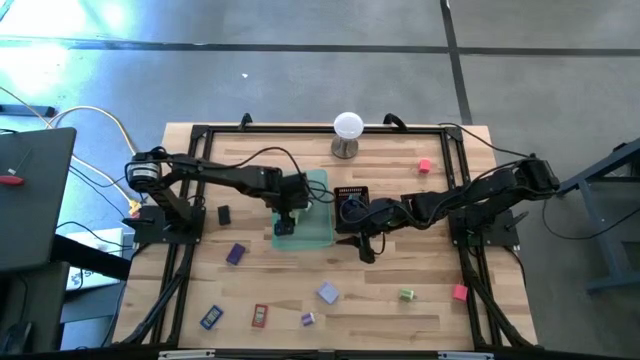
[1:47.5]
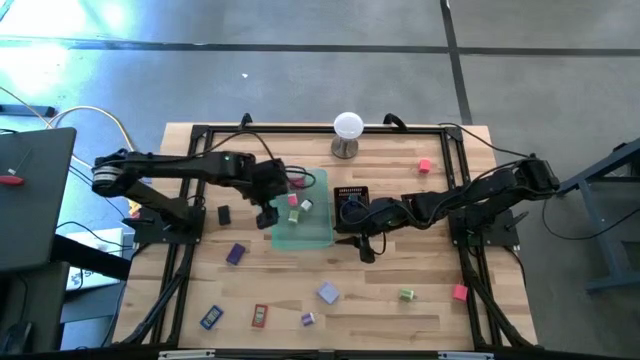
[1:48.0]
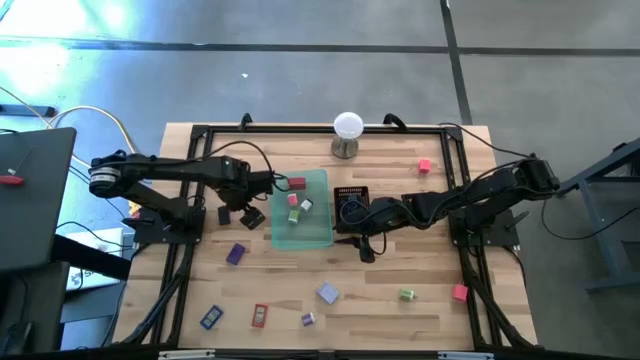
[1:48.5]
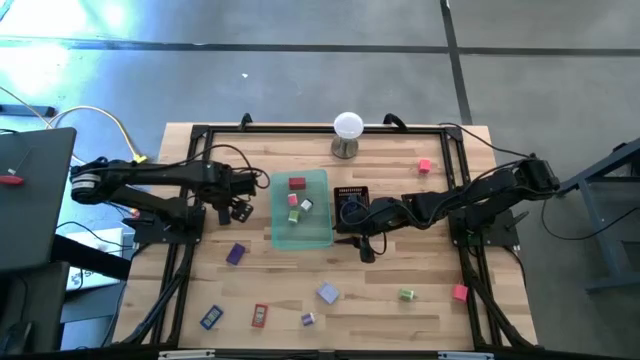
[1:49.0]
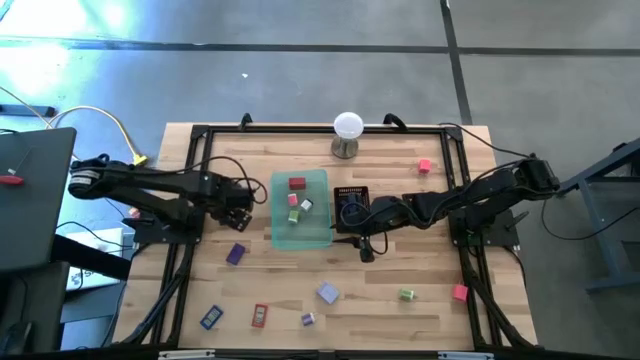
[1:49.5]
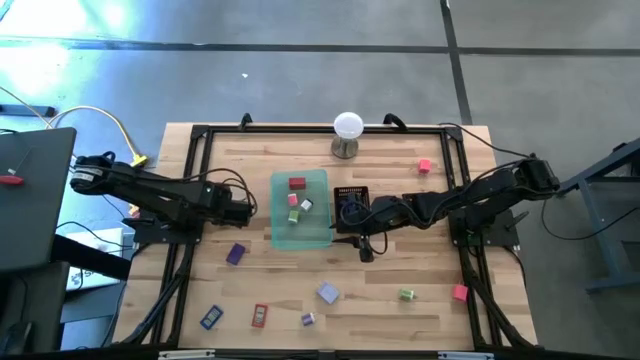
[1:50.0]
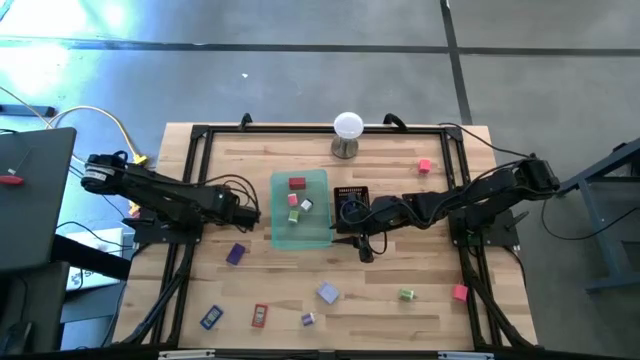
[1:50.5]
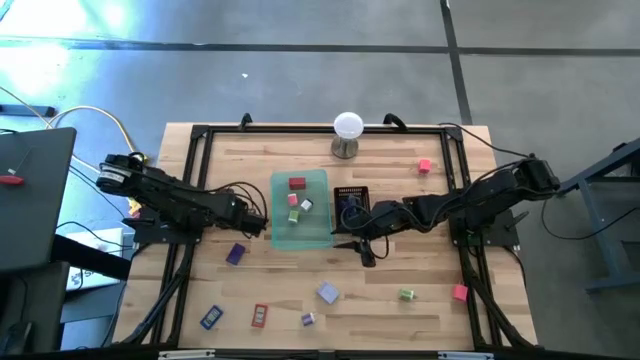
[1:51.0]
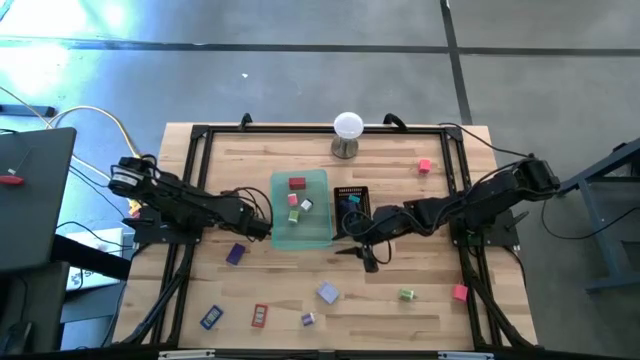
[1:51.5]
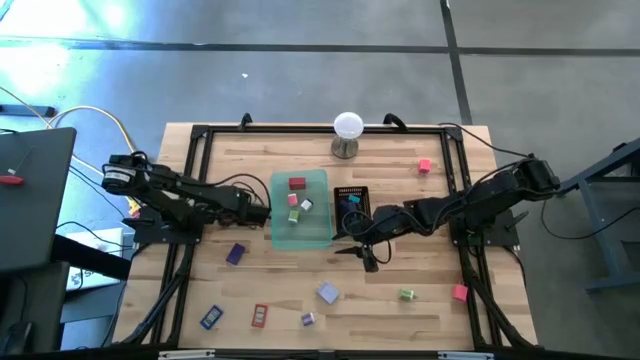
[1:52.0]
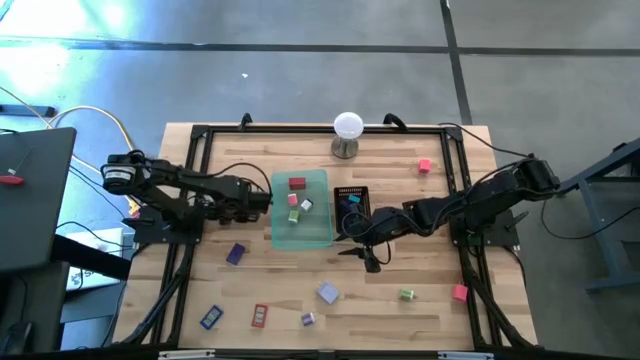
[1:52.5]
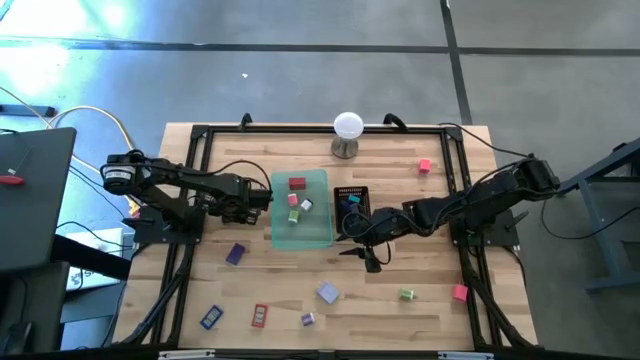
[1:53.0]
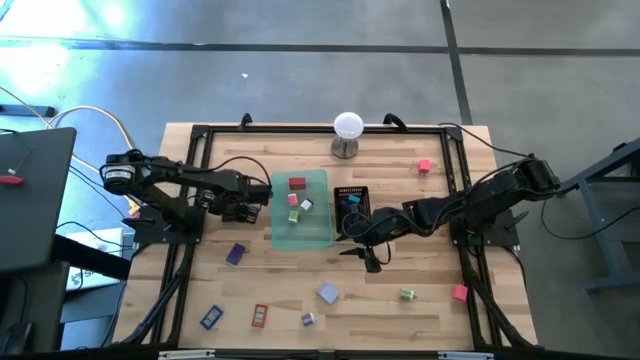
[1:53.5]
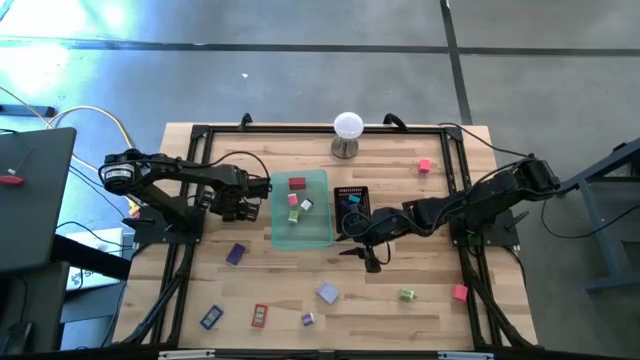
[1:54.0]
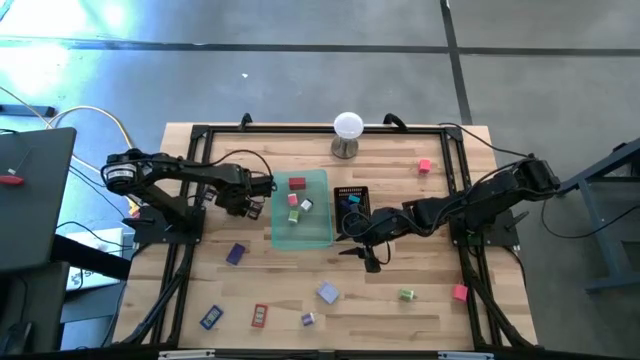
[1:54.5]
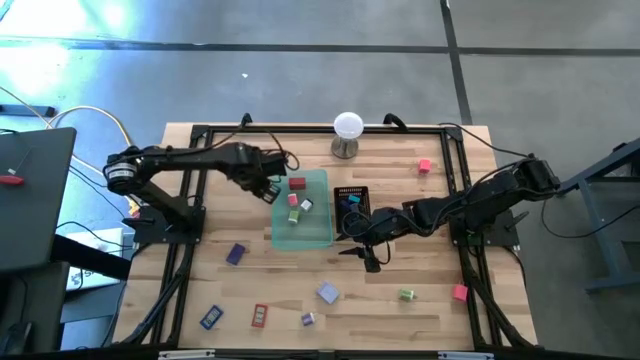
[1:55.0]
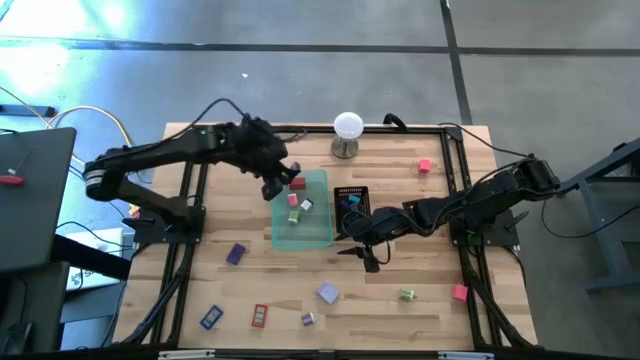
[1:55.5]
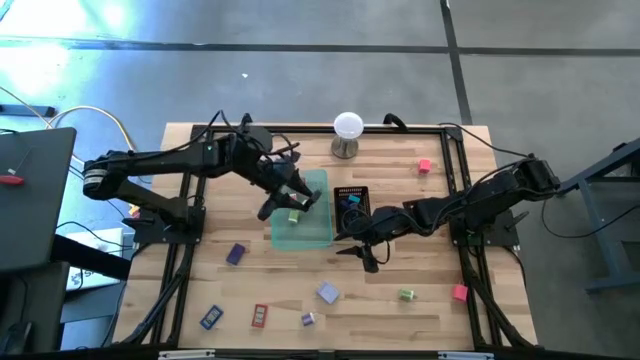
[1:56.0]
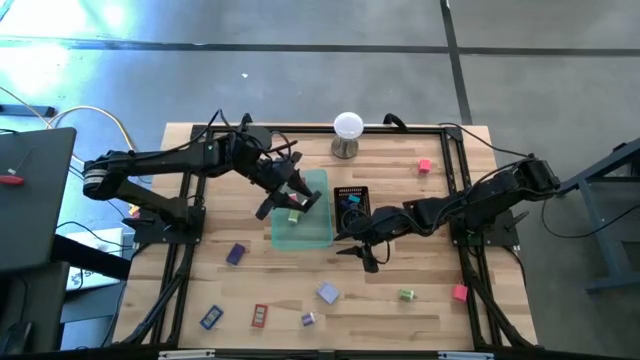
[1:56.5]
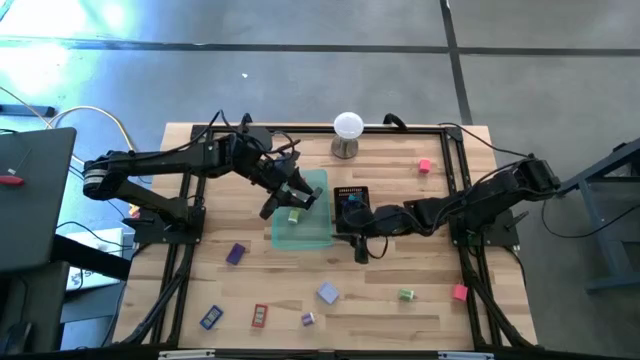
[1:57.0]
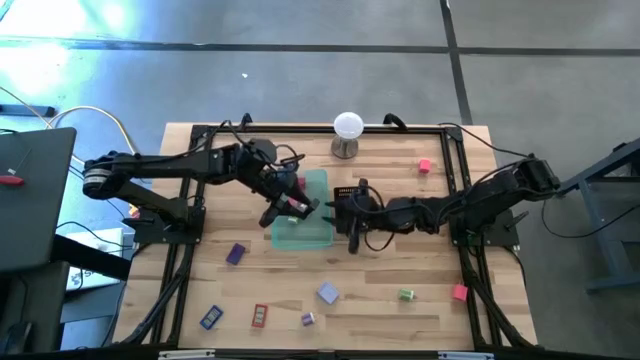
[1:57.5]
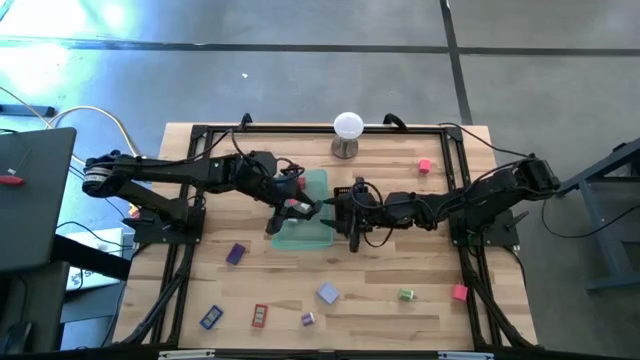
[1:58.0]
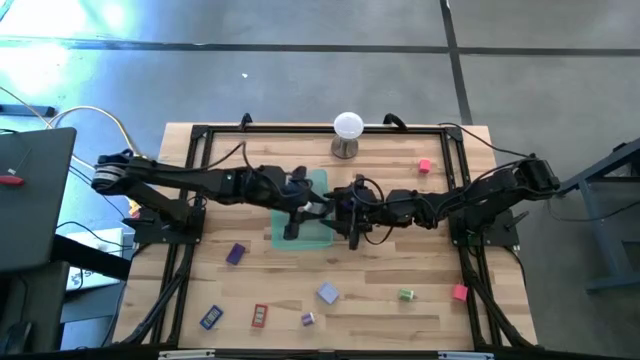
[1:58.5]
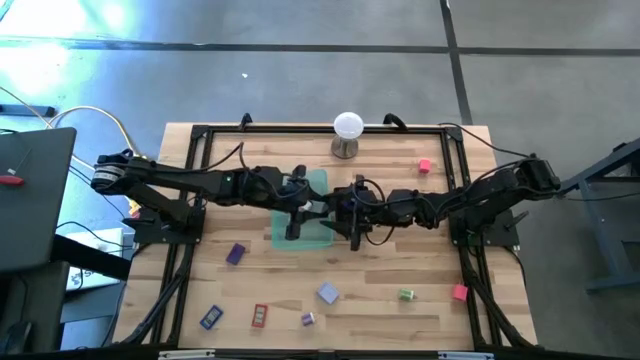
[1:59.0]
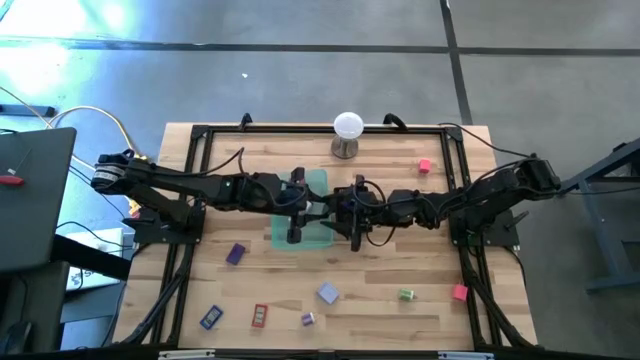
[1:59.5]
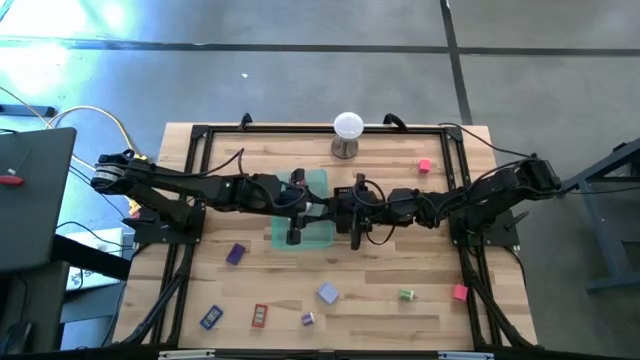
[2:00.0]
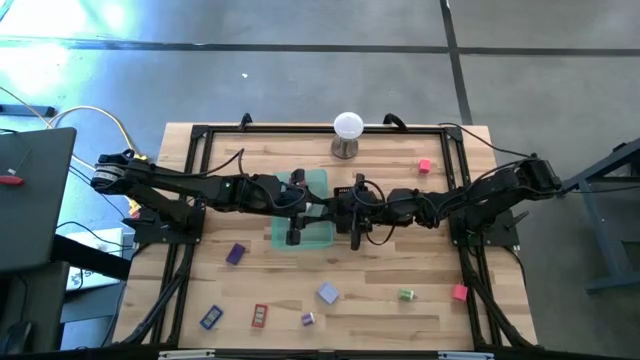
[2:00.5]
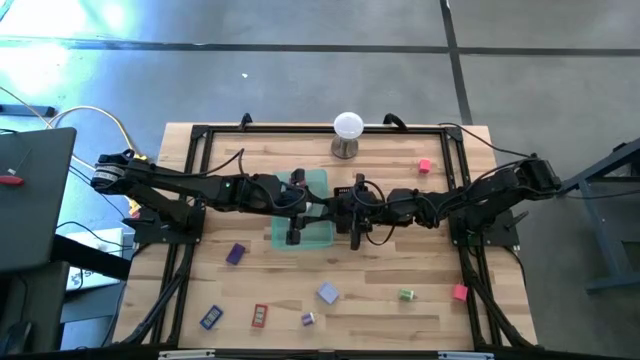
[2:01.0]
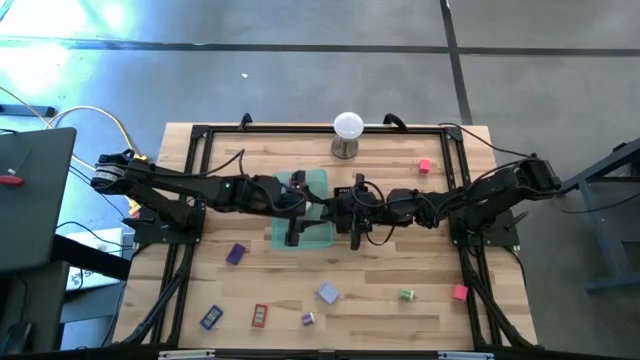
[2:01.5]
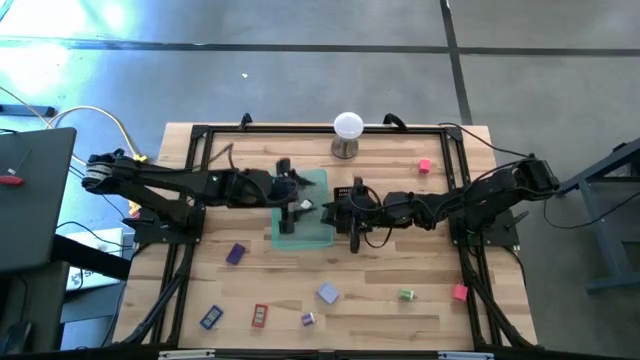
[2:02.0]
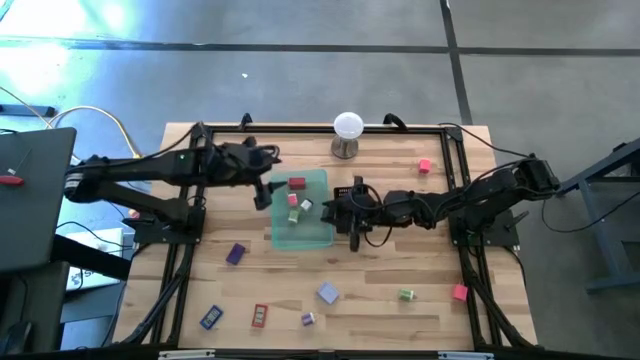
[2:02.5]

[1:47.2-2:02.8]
Task: Pick & Place Office items
Put the black digital clock into the black bin

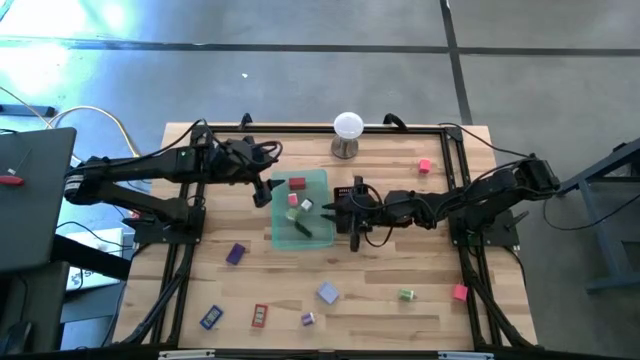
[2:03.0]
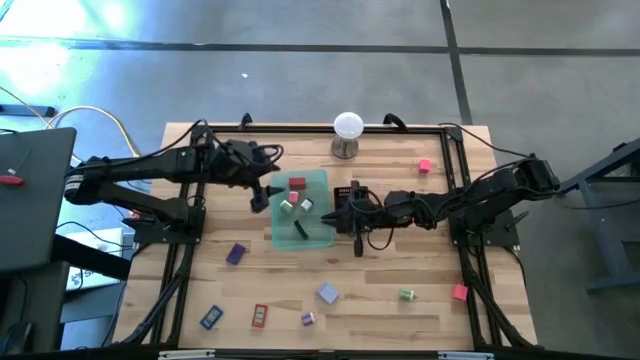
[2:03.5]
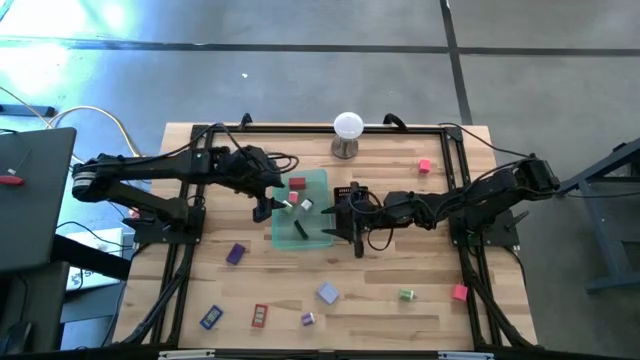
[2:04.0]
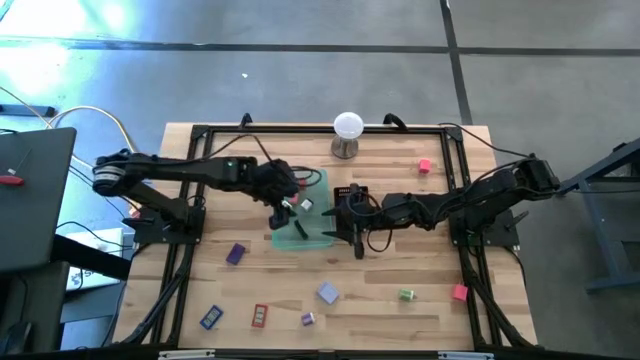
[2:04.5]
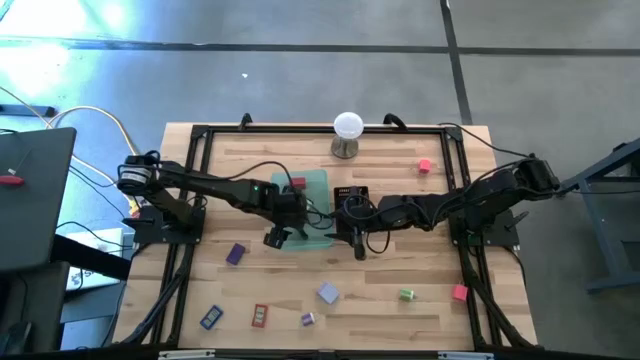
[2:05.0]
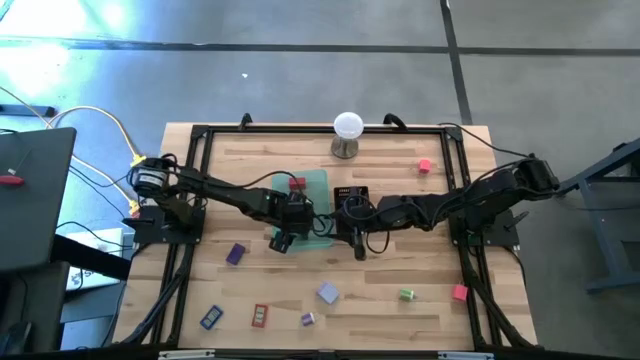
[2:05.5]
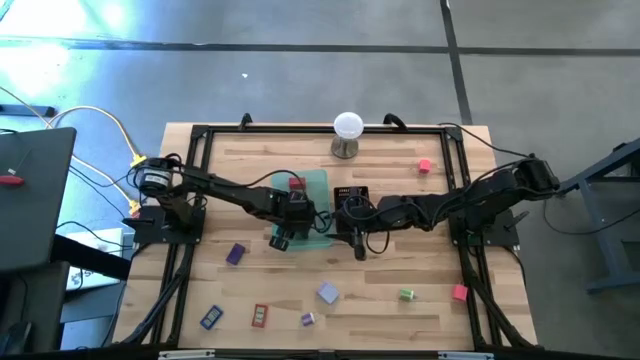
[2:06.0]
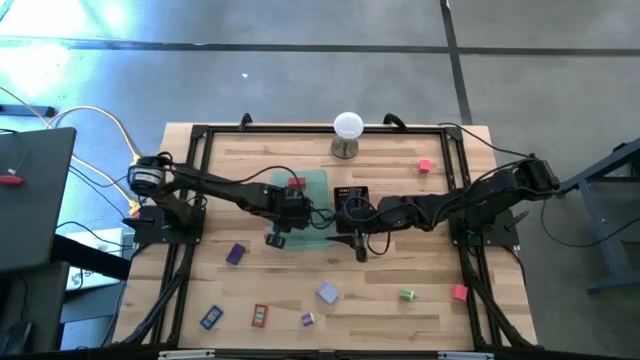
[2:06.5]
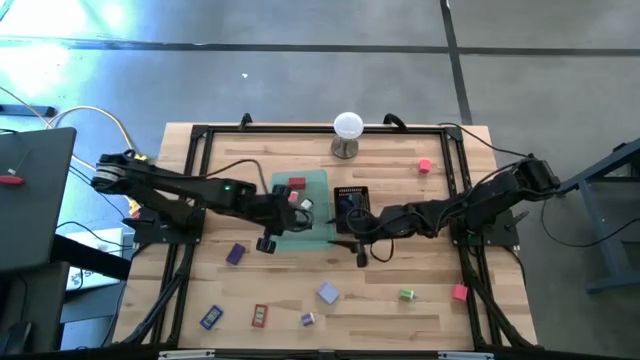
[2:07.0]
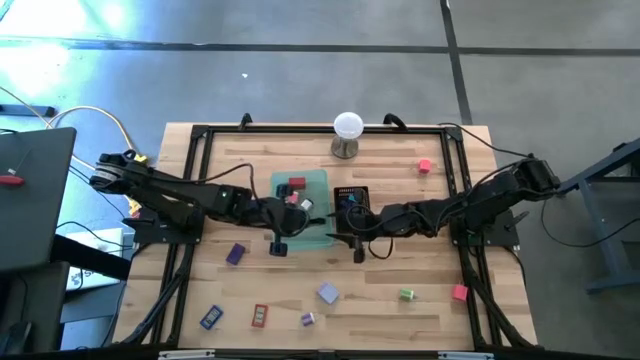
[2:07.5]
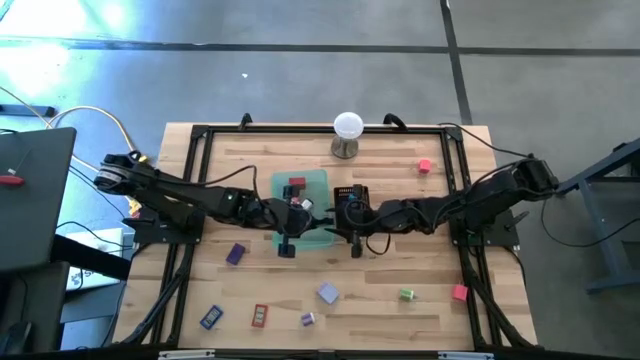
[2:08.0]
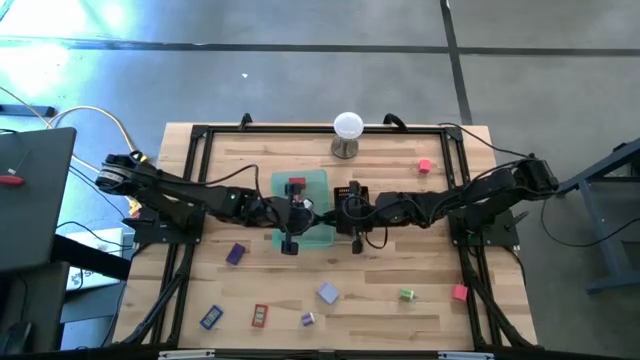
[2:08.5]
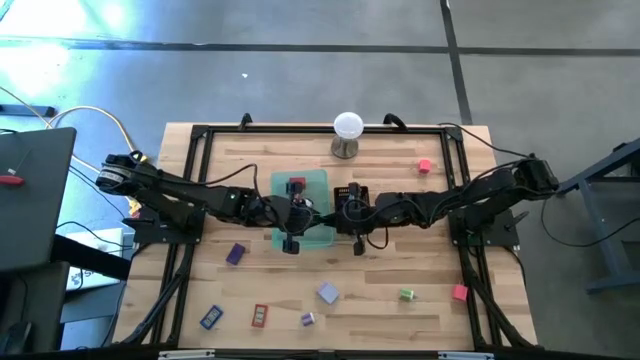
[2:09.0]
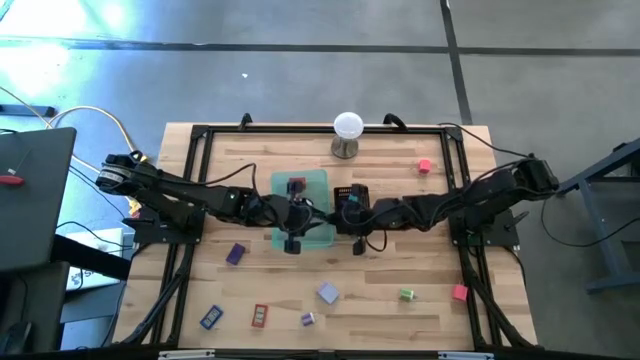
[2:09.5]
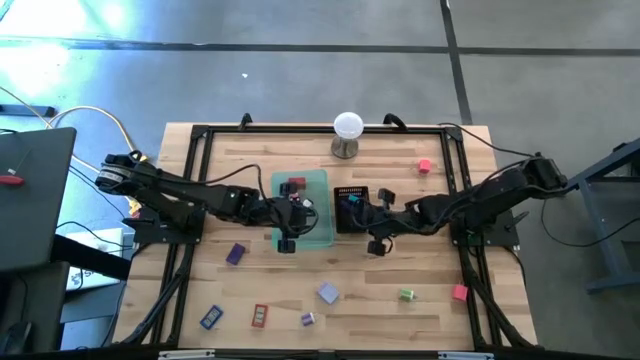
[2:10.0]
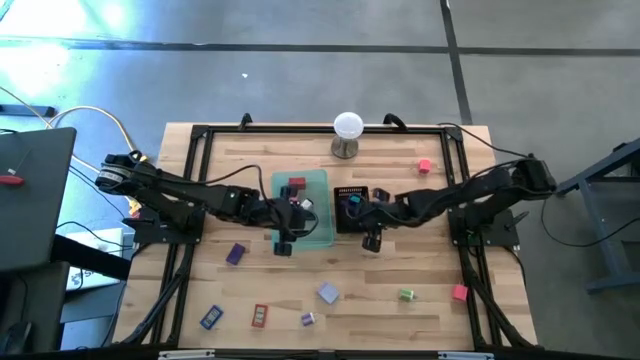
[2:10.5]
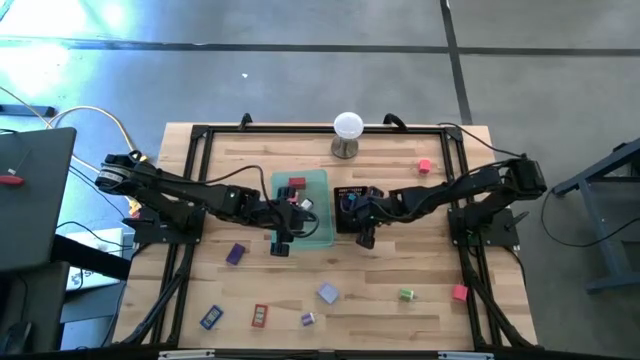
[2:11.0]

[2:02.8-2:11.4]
Put the black digital clock into the black bin
